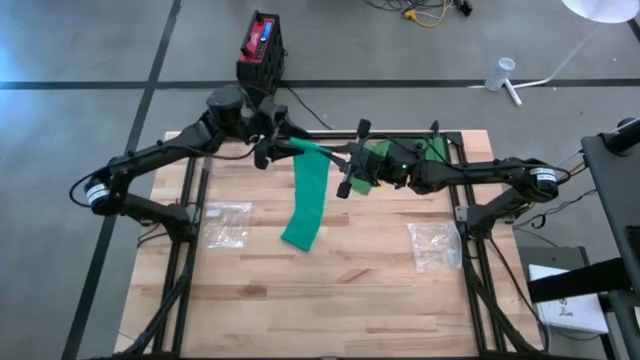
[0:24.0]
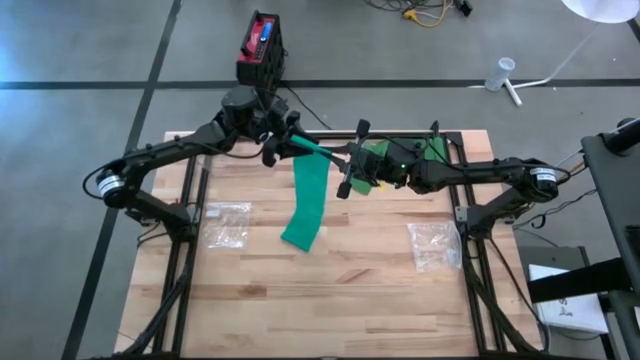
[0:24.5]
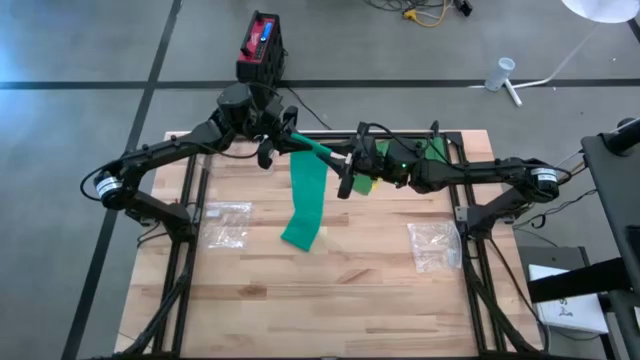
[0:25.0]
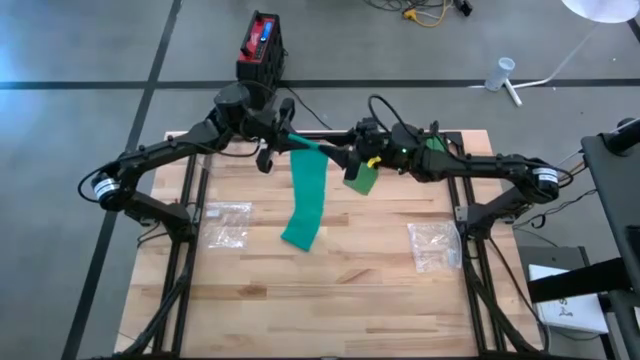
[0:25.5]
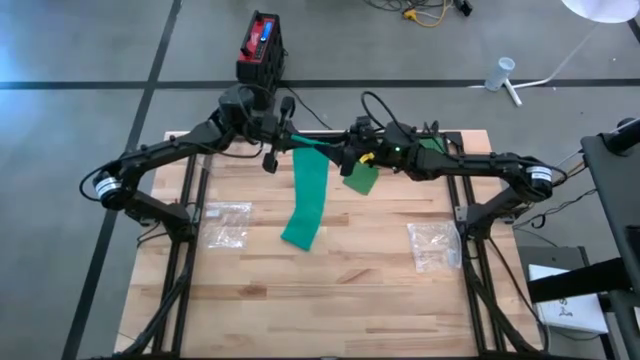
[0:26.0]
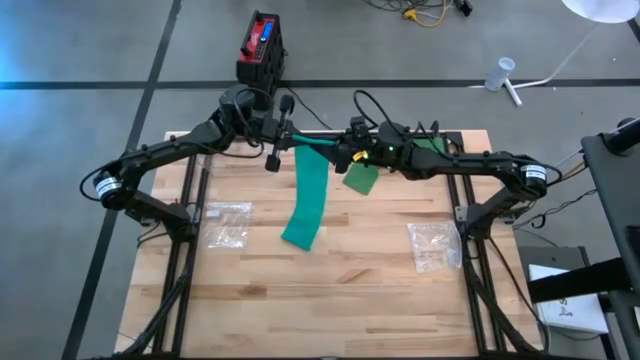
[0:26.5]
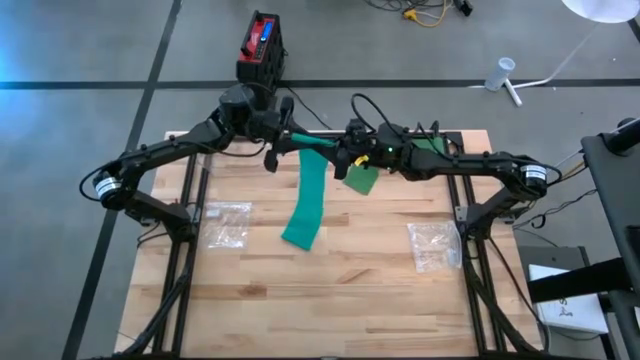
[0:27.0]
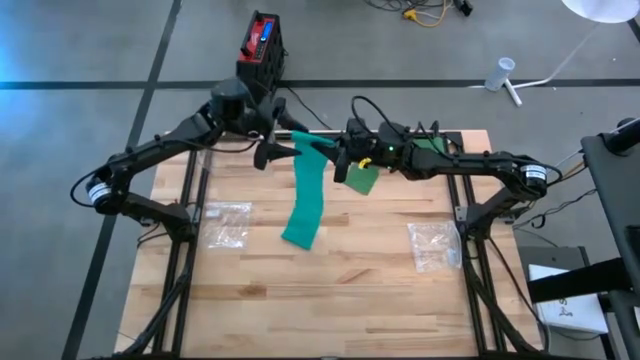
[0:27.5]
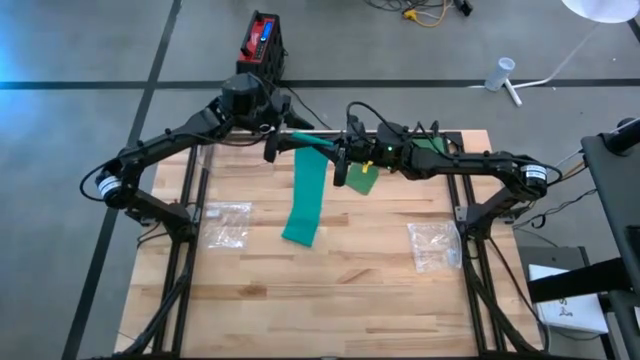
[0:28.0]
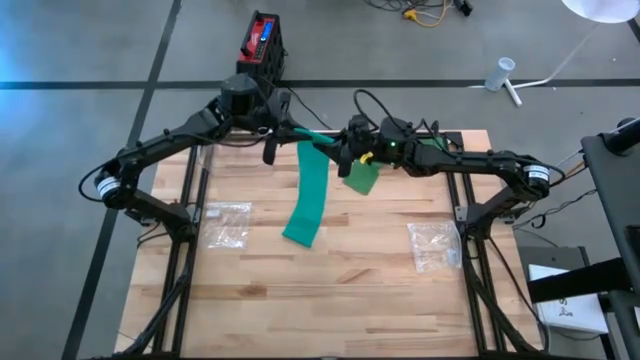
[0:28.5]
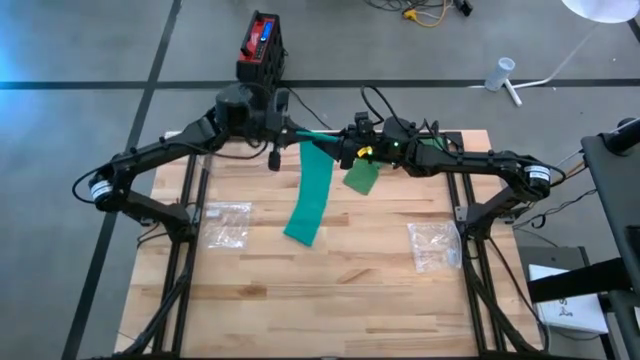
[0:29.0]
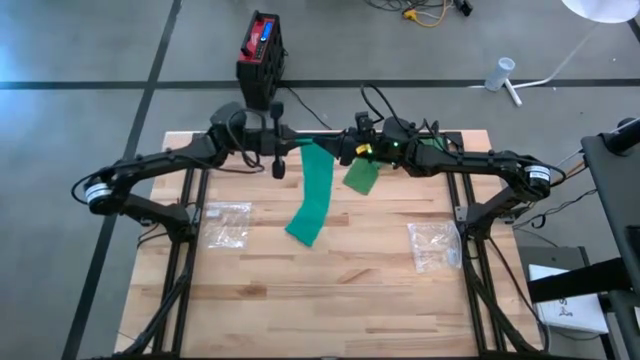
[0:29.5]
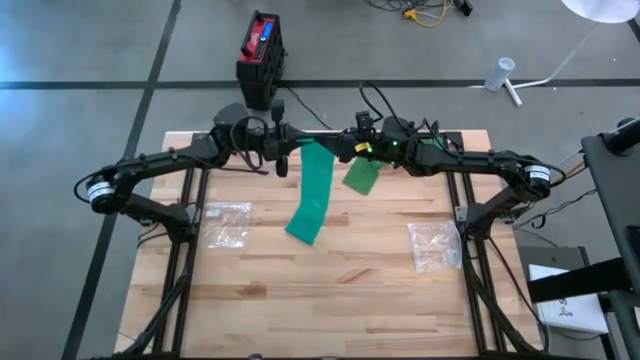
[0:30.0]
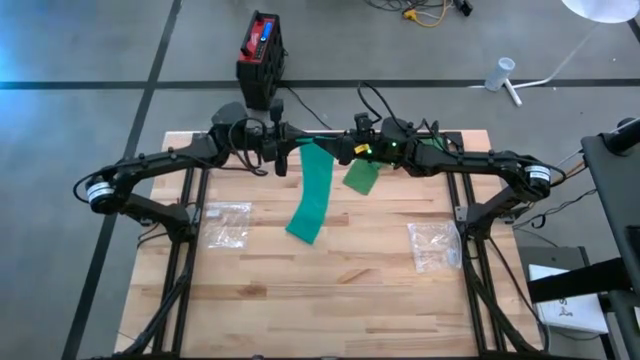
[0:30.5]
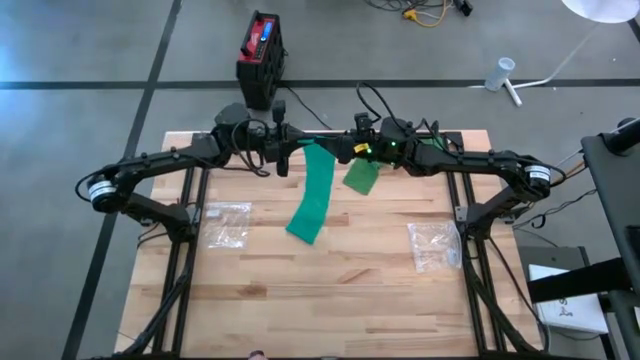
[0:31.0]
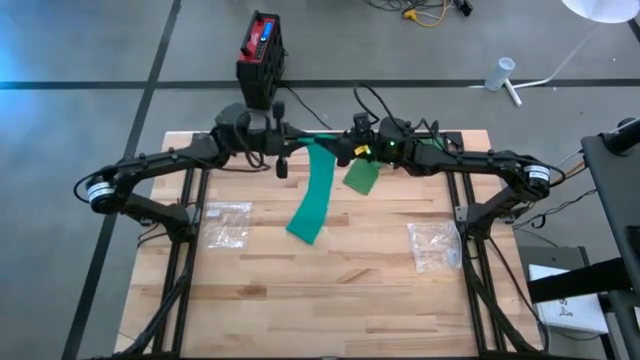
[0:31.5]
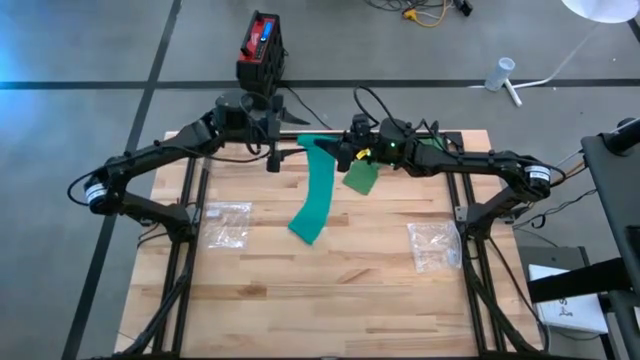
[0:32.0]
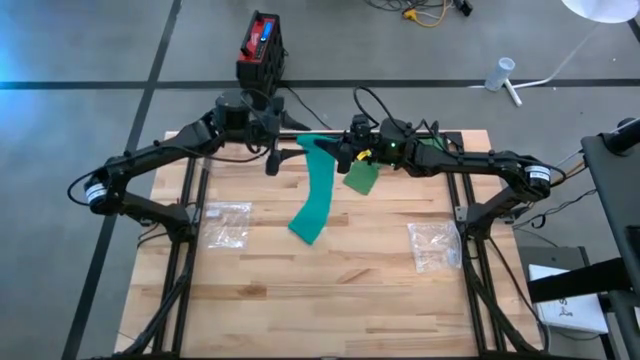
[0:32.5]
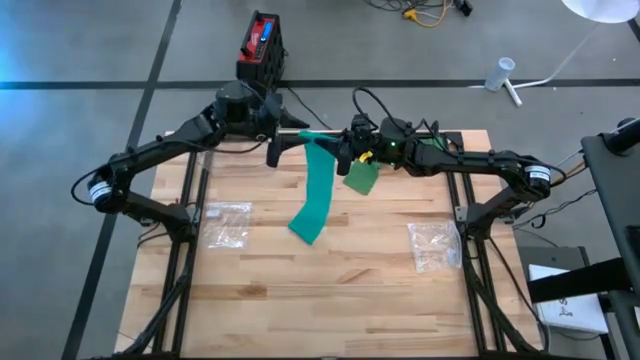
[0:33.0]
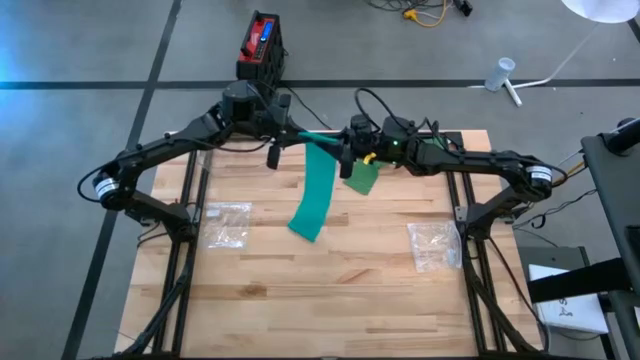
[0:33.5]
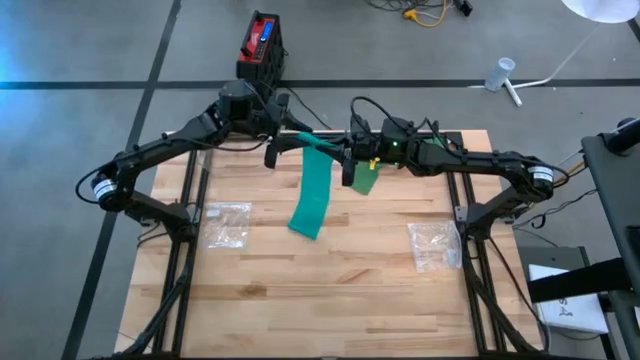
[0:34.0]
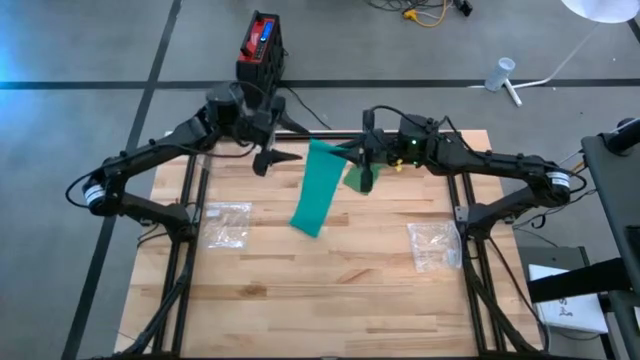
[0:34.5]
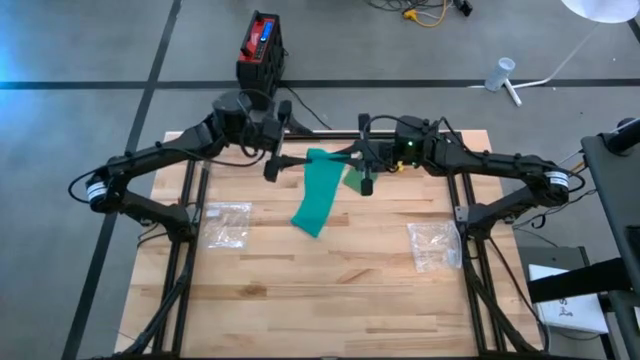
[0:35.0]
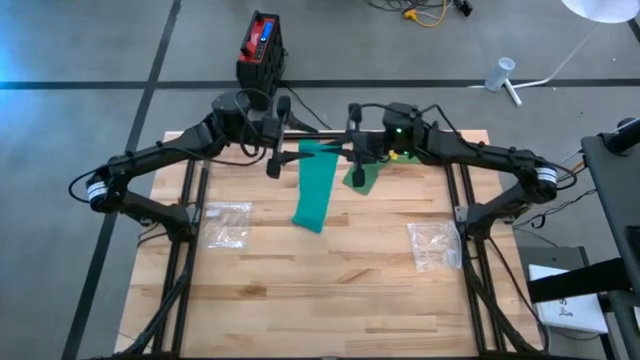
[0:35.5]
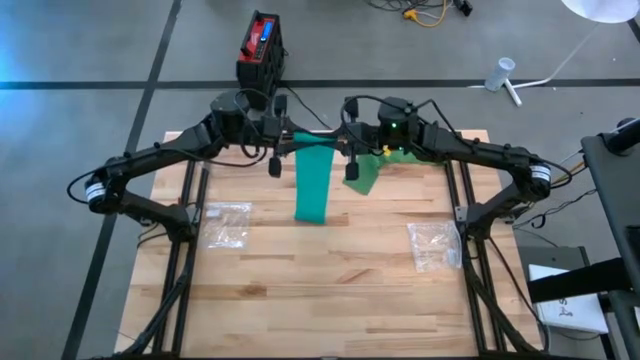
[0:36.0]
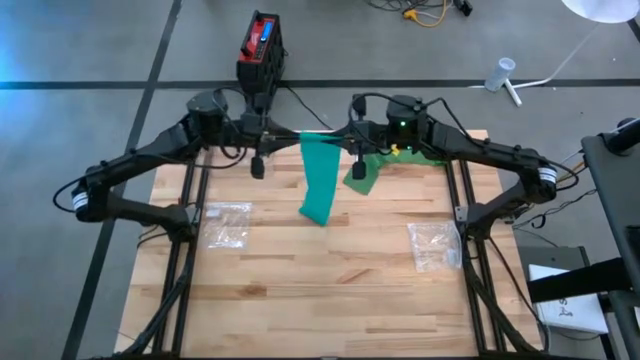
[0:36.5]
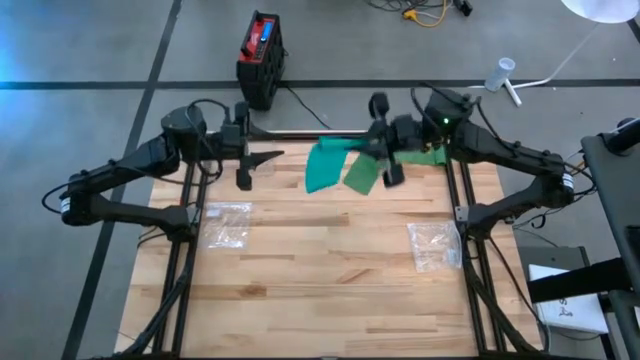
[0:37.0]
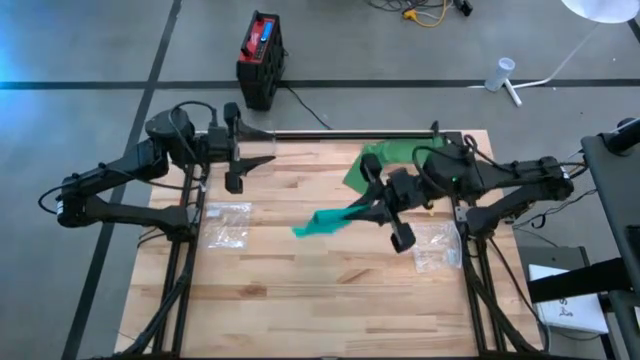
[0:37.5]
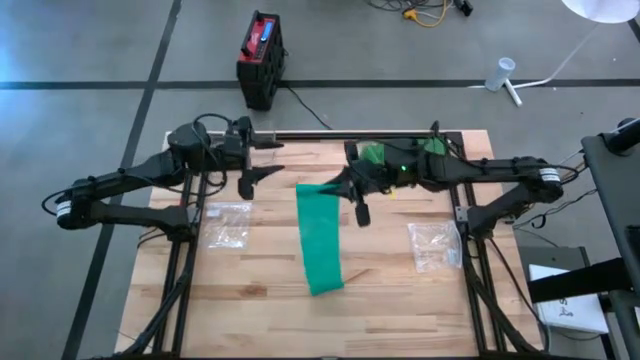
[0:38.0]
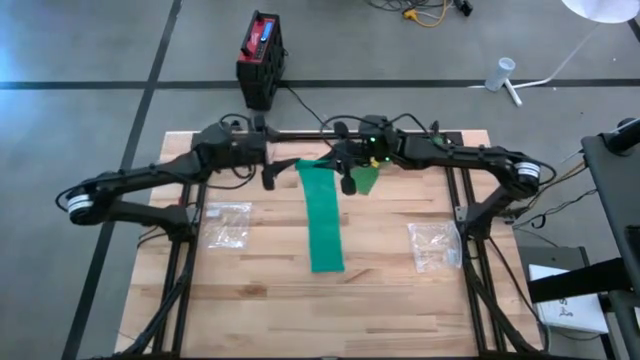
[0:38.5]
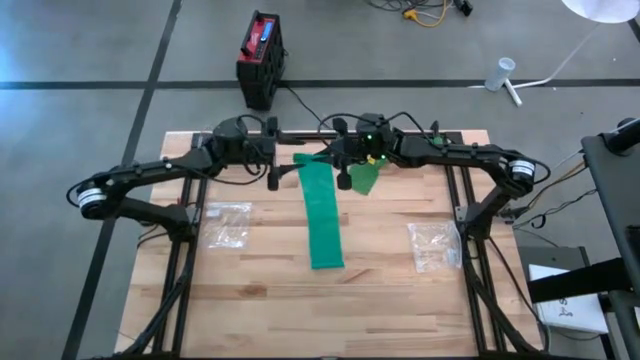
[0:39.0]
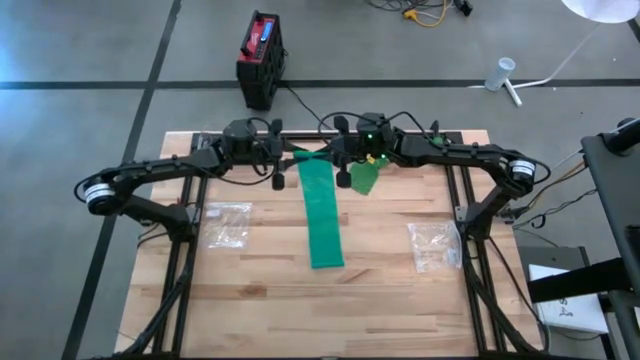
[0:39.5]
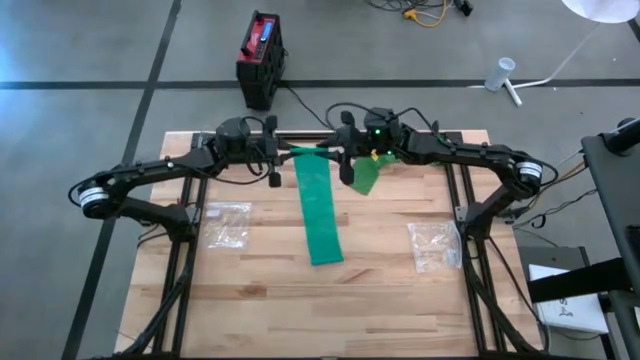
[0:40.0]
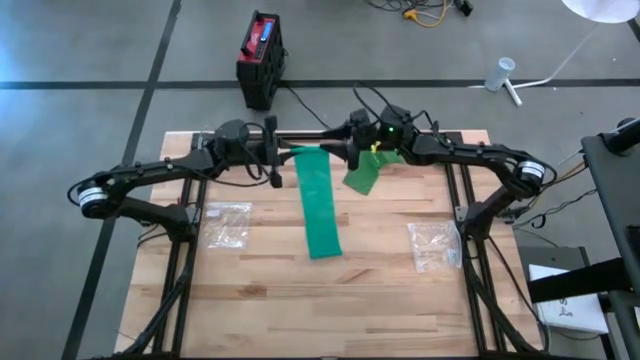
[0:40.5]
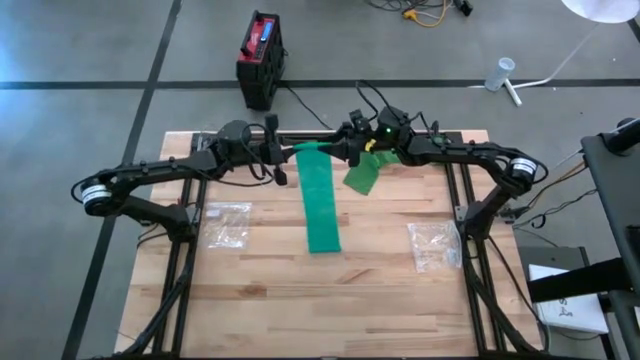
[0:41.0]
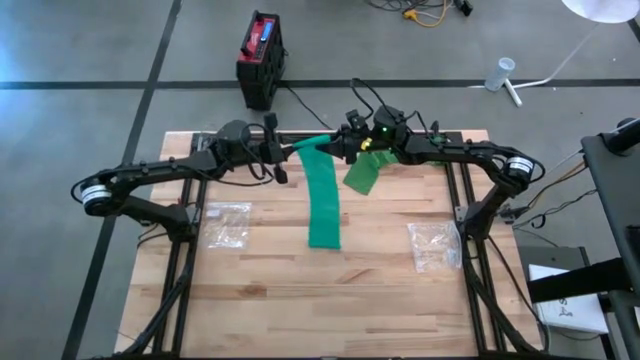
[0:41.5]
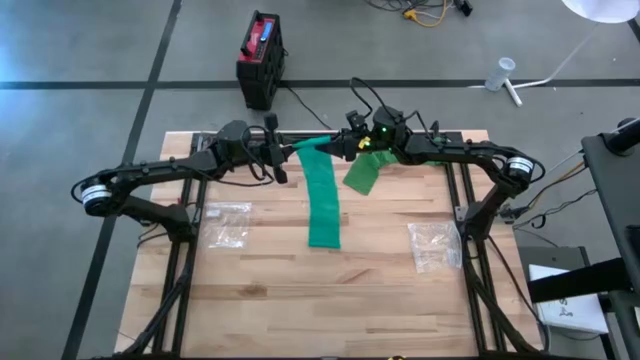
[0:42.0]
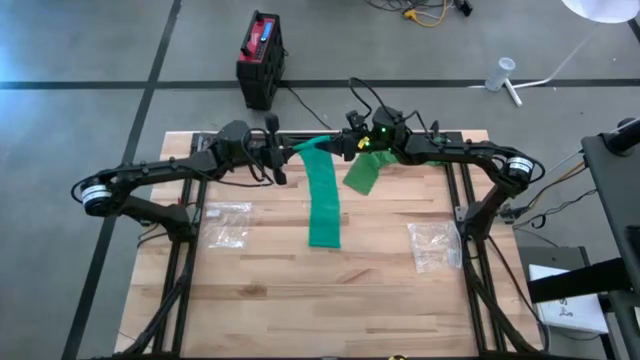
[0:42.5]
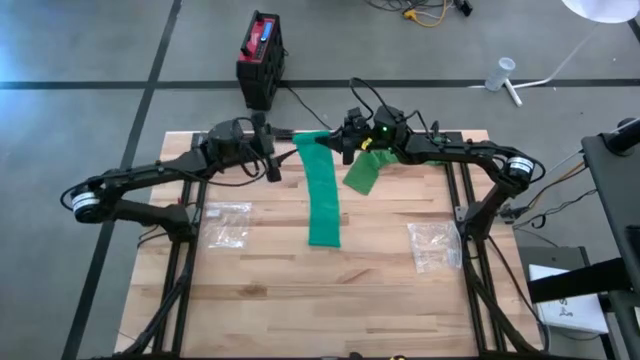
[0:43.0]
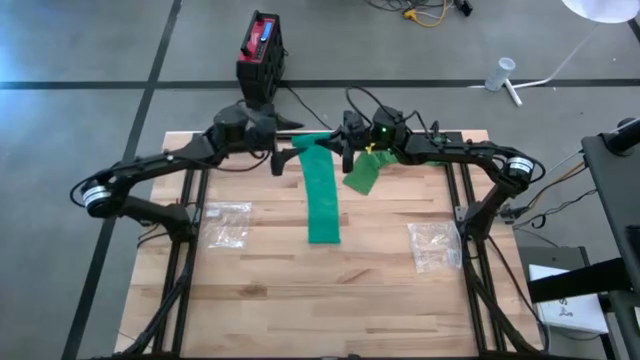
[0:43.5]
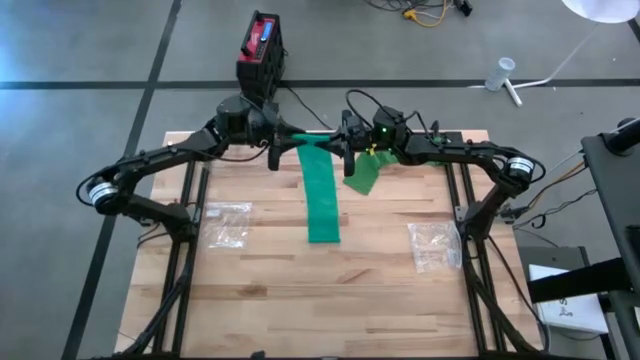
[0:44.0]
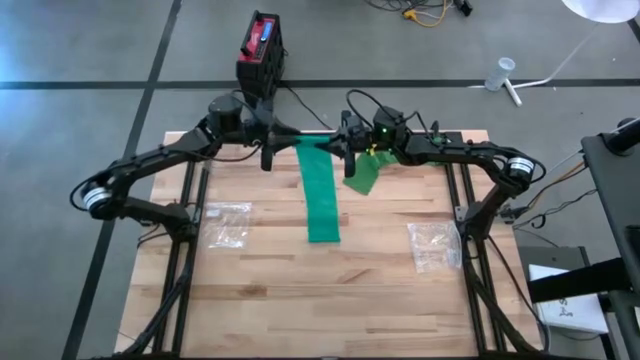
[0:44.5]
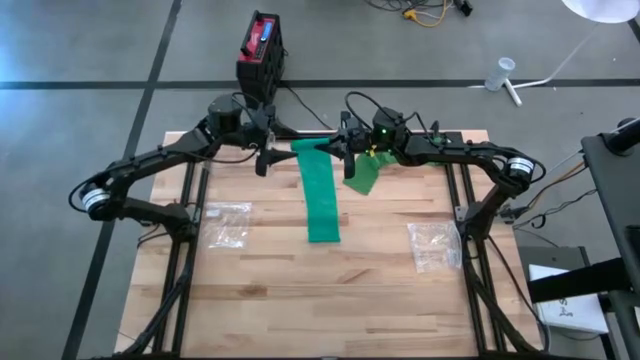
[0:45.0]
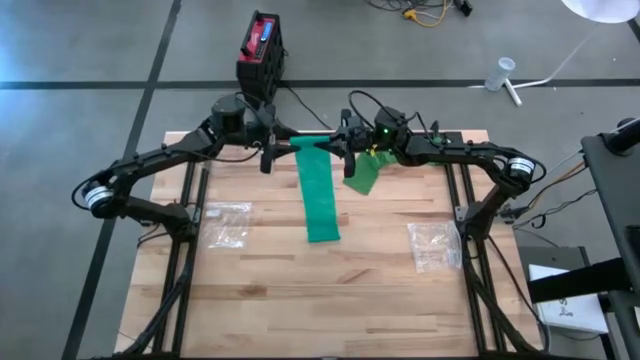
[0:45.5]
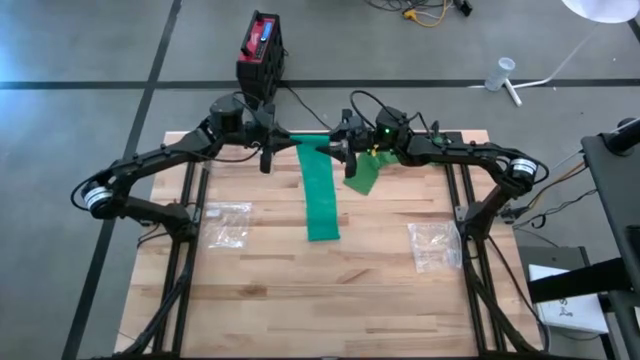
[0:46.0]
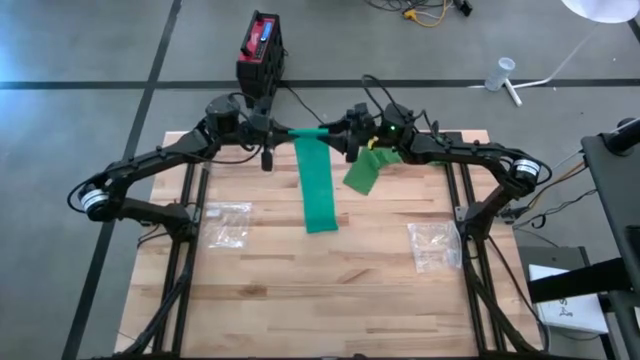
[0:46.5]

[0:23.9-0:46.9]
Task: Roll bandage
Roll the blue bandage
